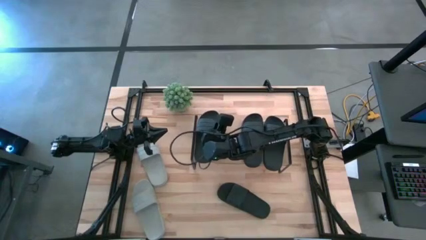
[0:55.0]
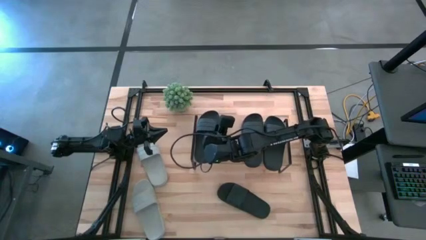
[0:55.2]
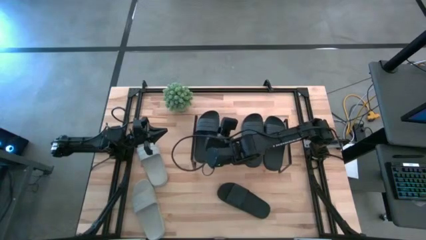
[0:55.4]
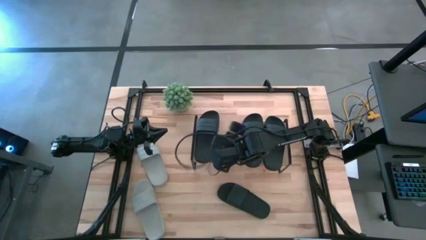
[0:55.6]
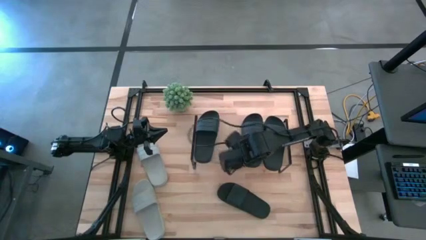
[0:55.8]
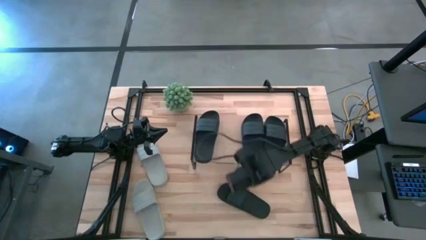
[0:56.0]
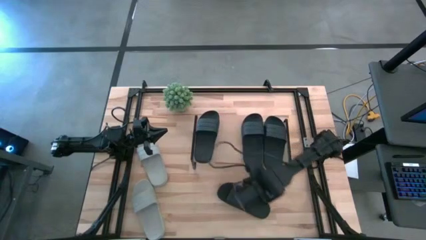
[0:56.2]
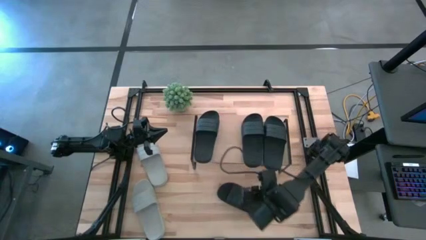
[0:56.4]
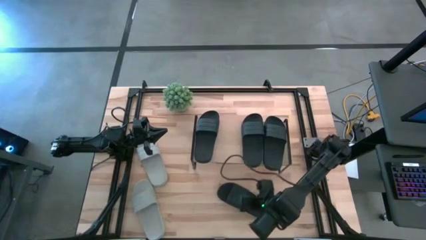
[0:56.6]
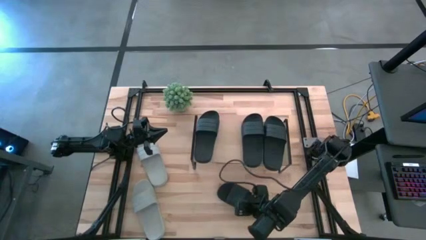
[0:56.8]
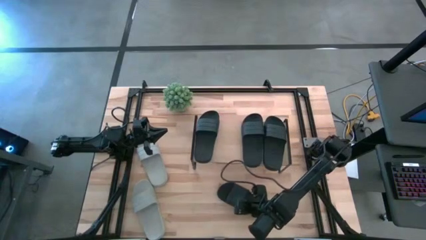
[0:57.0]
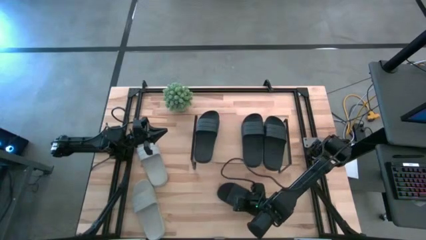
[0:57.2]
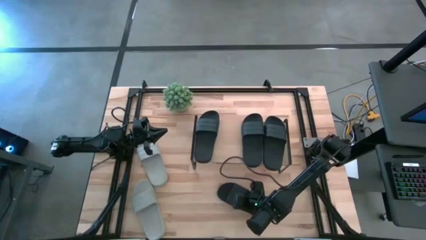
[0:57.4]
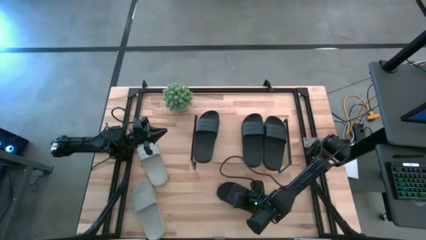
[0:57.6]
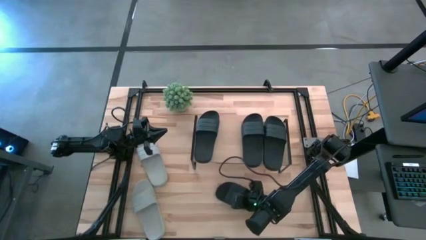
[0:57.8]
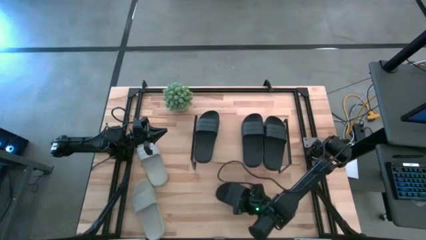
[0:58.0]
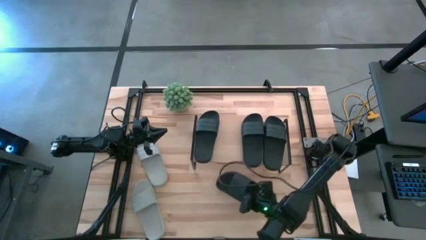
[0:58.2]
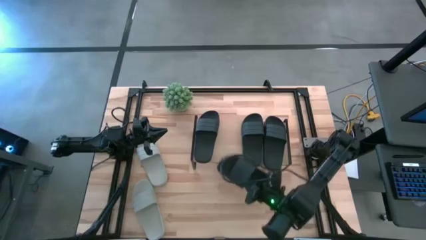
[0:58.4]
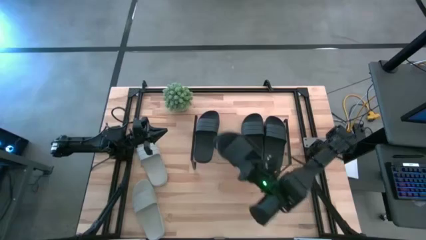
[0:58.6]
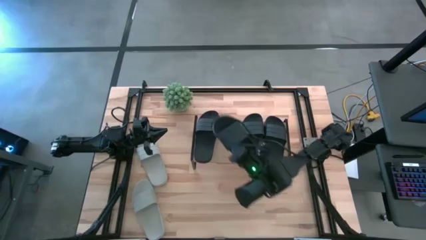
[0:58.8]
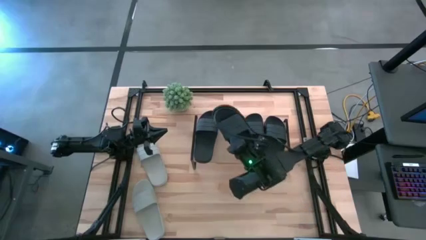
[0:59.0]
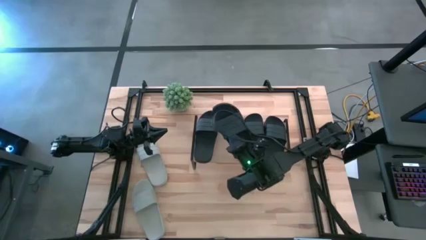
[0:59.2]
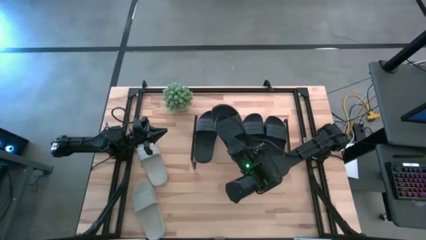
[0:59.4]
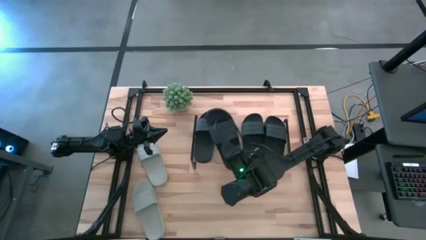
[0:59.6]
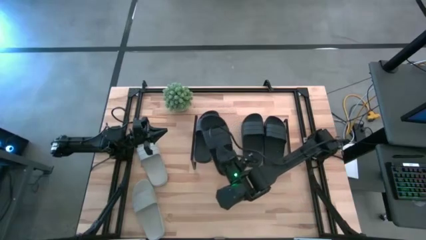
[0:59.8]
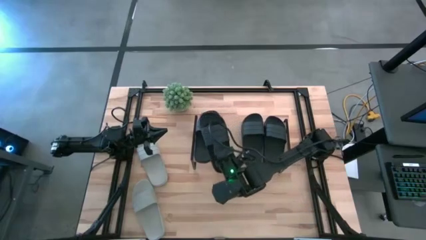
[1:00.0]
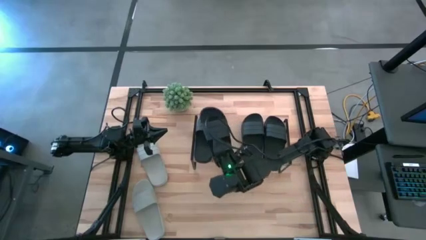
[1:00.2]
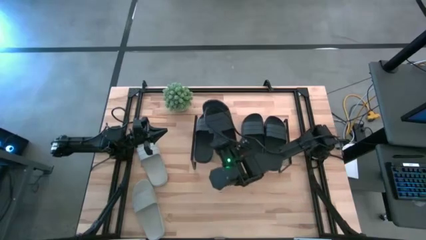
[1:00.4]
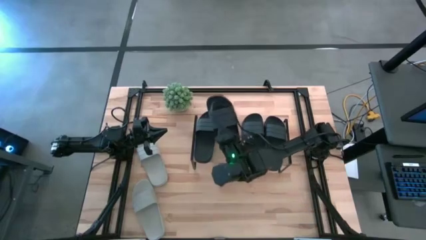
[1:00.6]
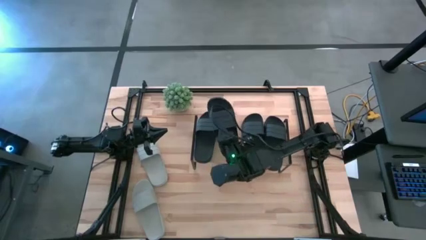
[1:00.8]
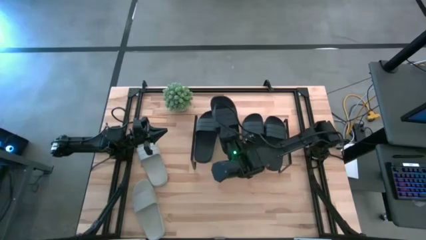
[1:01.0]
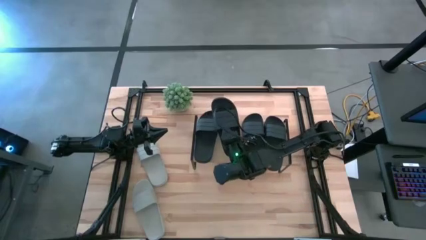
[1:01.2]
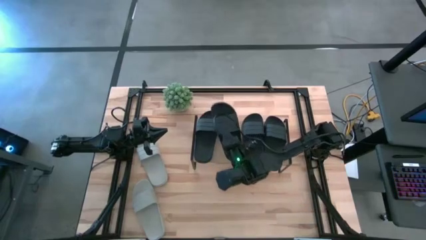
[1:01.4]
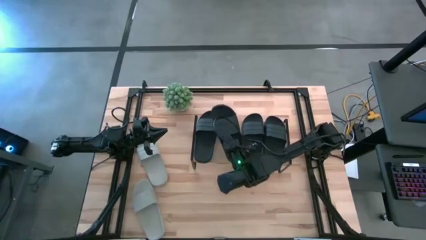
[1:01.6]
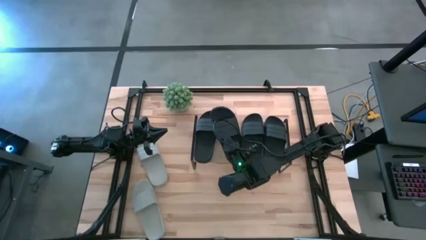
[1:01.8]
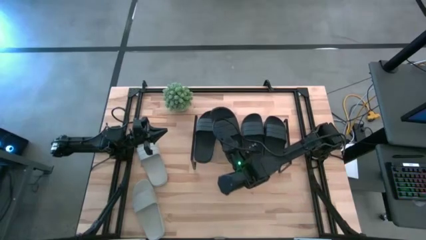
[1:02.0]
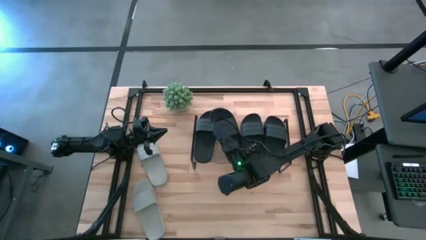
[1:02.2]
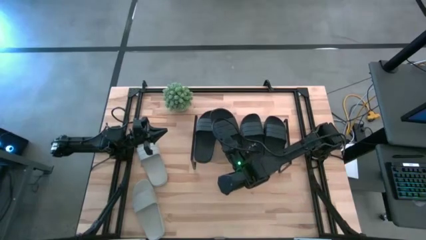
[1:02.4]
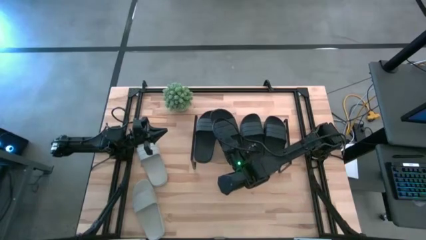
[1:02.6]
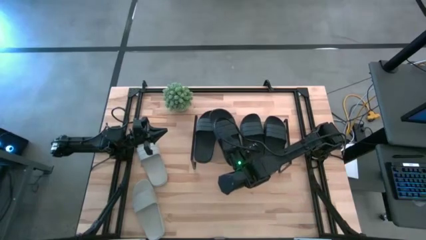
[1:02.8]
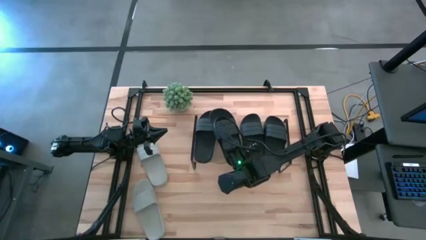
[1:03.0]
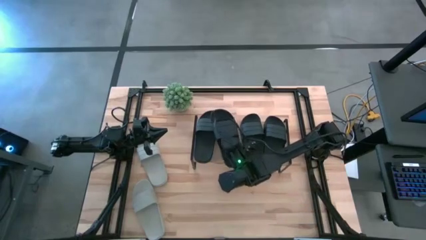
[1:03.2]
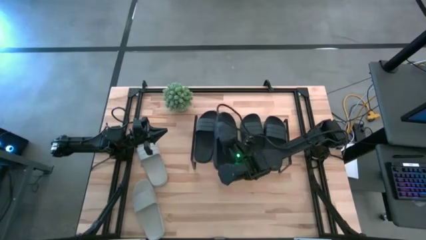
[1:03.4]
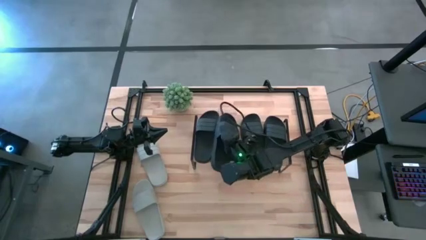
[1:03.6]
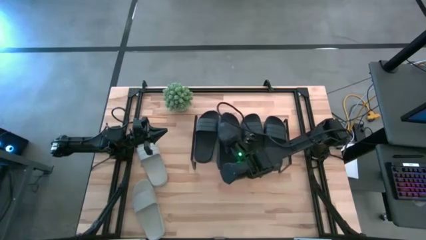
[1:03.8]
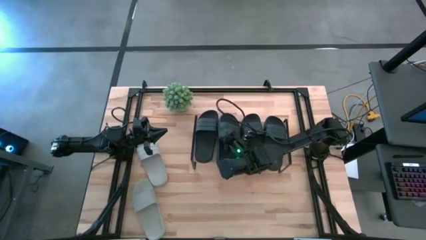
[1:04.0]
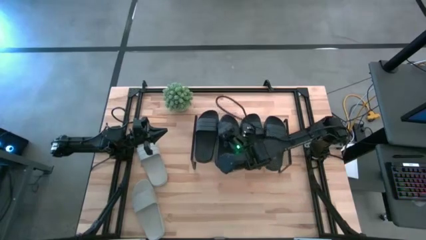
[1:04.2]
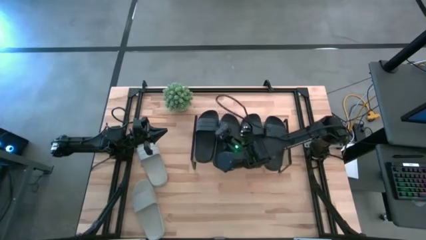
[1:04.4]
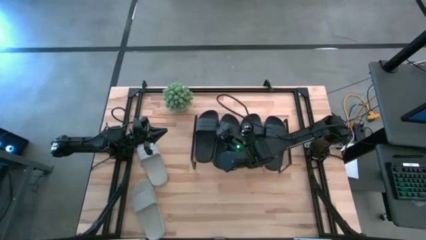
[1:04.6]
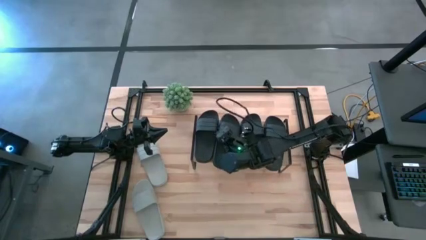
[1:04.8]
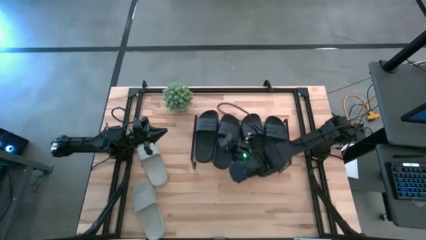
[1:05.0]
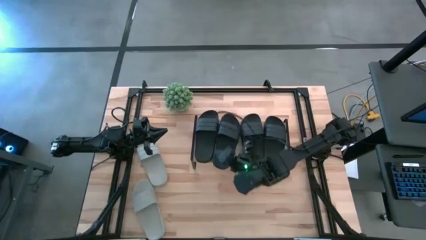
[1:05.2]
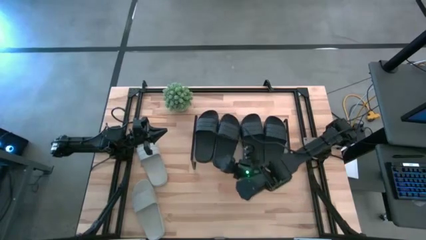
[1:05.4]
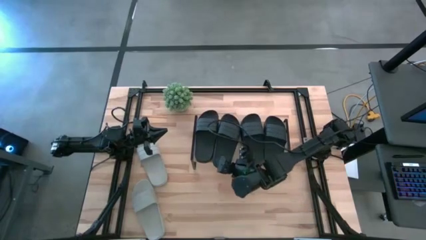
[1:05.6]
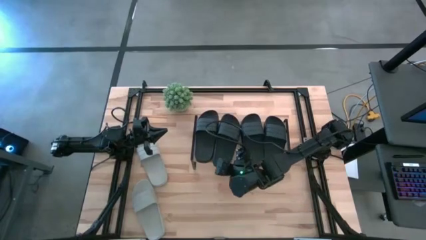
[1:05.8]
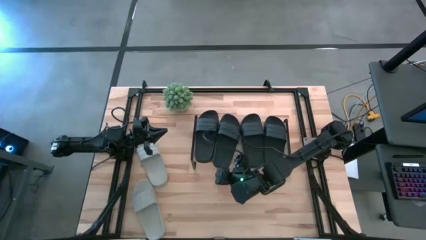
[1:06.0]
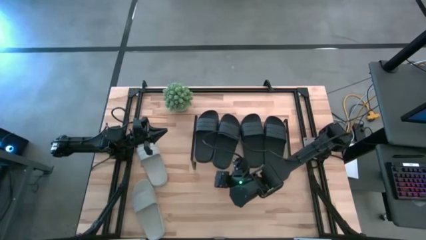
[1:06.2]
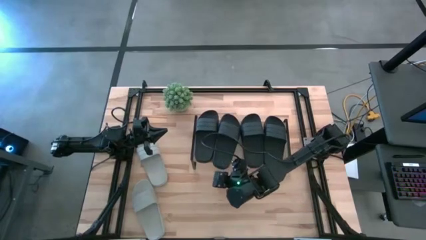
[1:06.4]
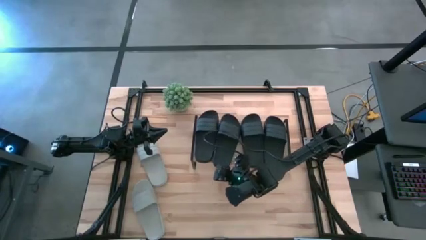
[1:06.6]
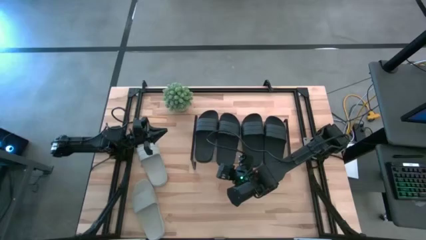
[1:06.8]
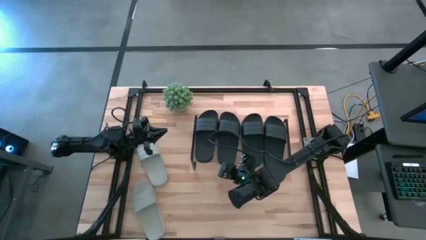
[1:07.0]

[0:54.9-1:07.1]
Task: Pick and place slides into the shelf
Put the black slipper on the shelf
